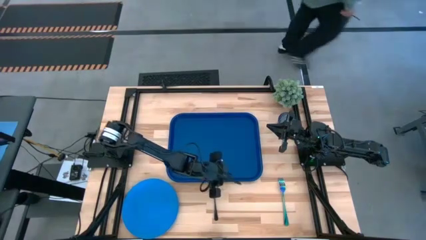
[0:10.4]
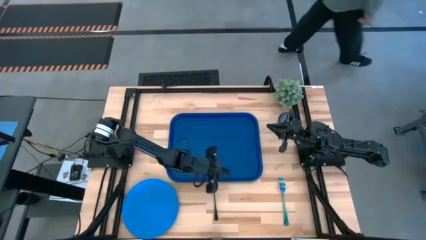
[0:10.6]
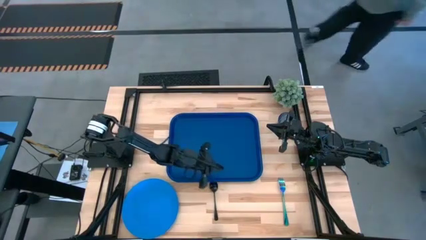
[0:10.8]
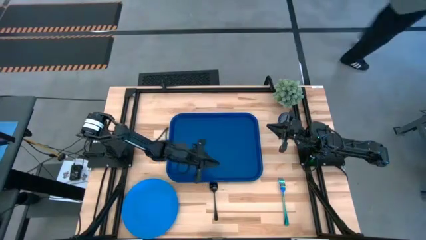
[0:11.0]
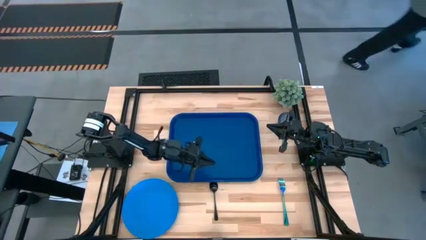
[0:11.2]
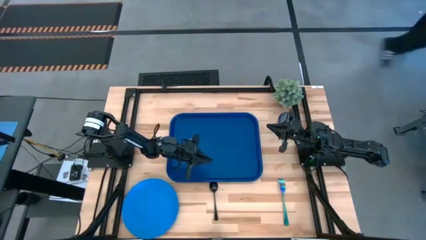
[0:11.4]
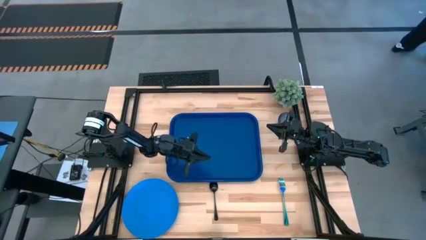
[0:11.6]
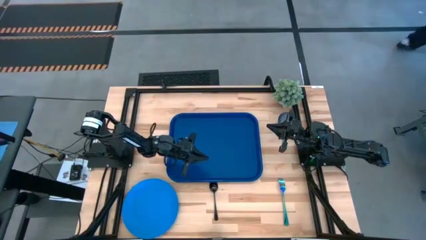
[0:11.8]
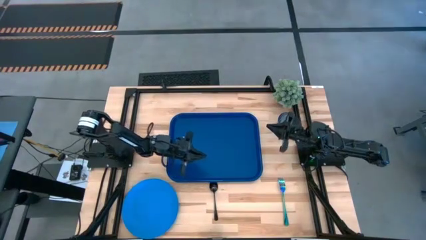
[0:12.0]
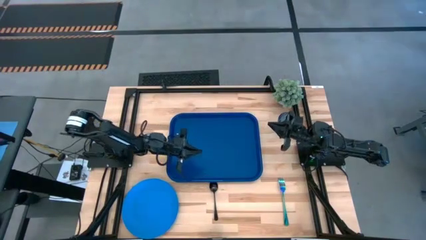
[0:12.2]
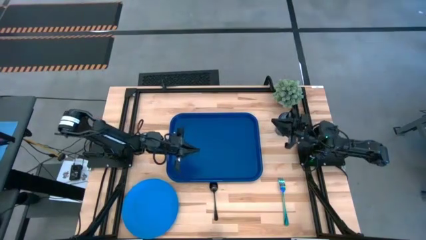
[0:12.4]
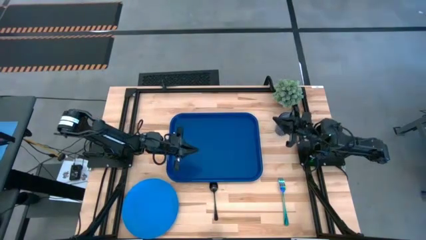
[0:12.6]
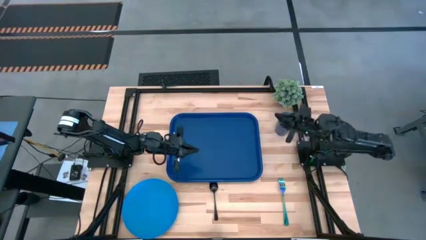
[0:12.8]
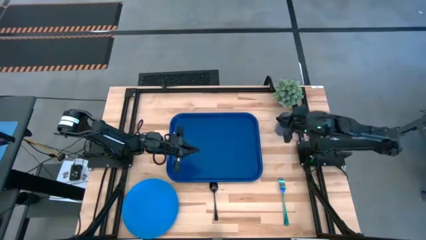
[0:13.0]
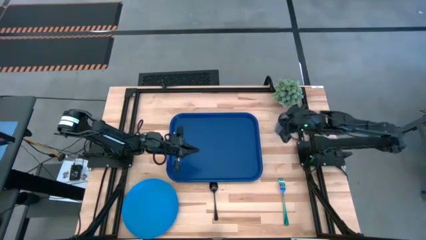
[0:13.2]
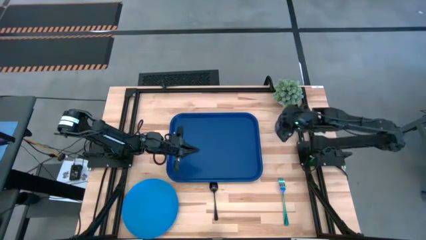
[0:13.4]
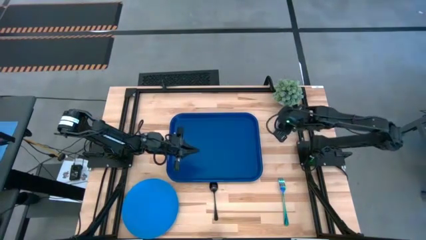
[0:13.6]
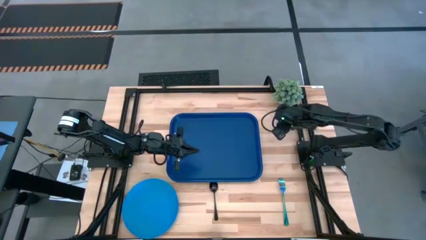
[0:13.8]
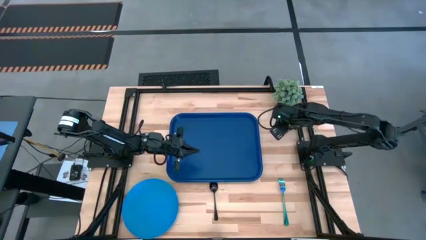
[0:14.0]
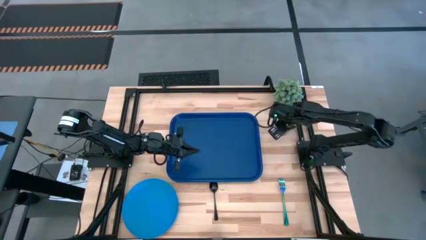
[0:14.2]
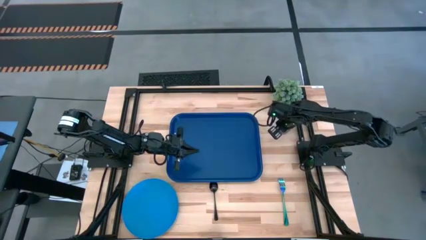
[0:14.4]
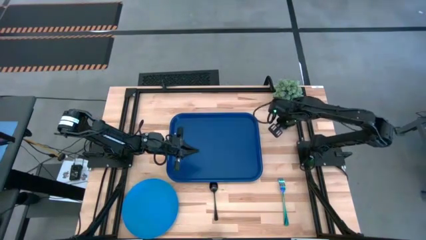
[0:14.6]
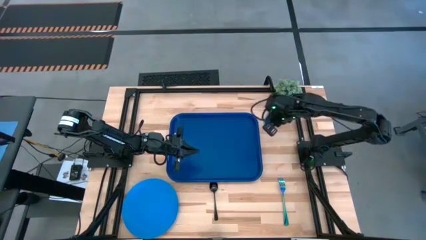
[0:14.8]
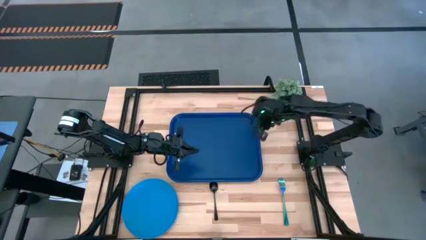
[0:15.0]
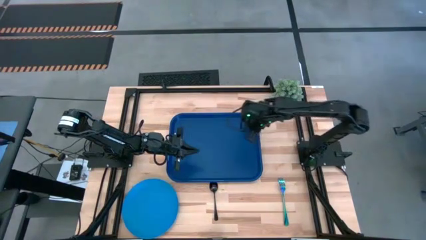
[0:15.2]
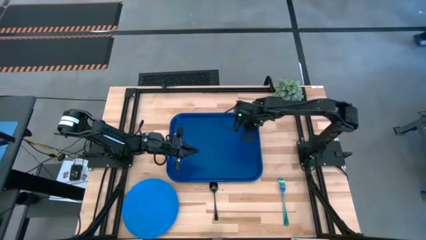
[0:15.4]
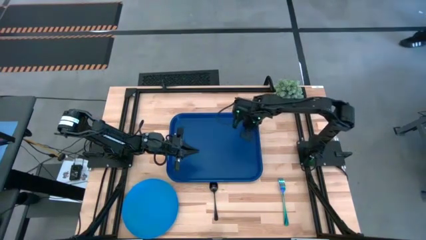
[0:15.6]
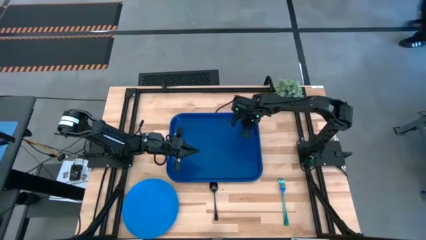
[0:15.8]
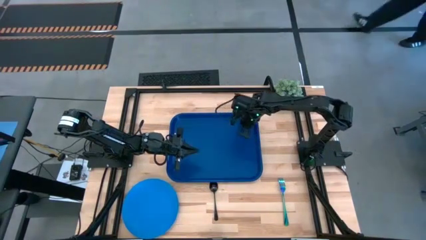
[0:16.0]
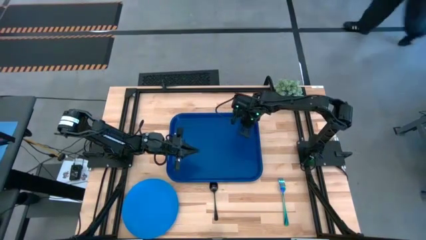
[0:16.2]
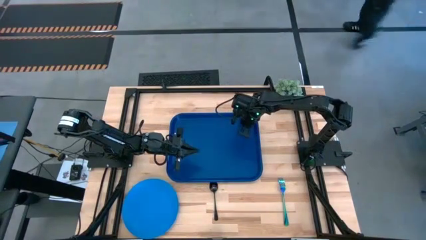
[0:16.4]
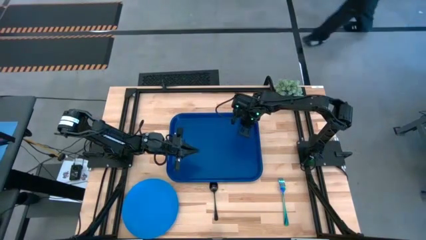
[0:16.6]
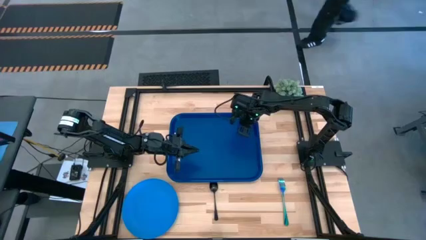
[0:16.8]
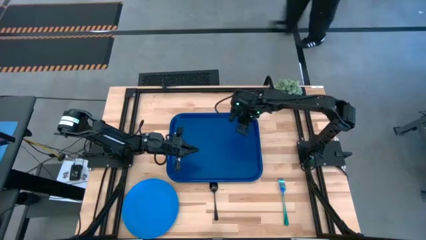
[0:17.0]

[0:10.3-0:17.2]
Task: Pick and place plate/cup/fork/spoon on tray
Put the blue glass cup on the top right side of the blue tray

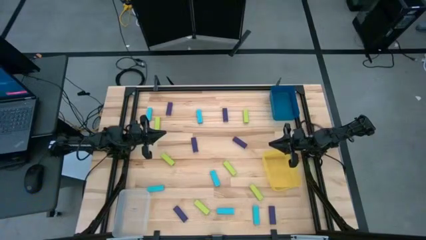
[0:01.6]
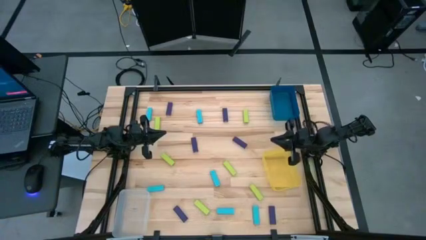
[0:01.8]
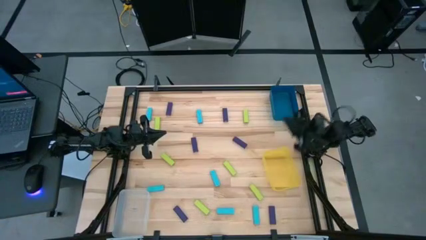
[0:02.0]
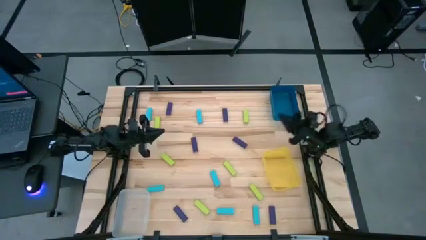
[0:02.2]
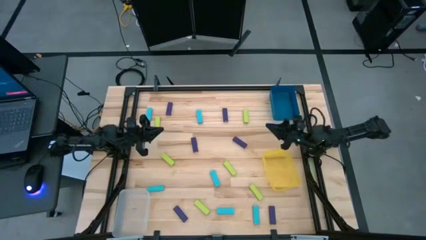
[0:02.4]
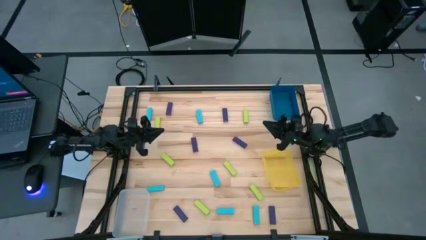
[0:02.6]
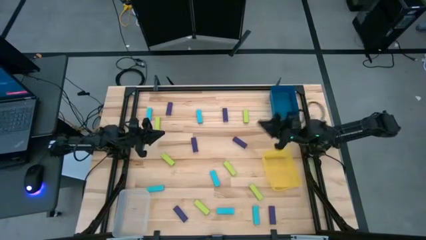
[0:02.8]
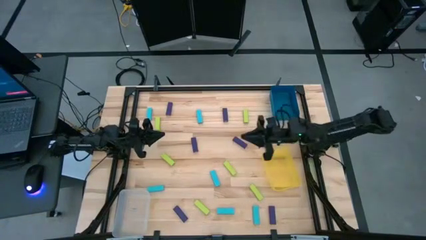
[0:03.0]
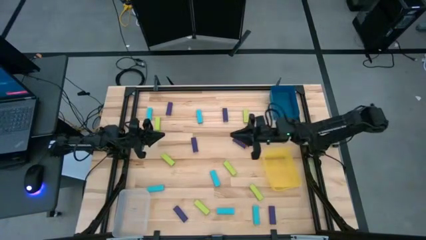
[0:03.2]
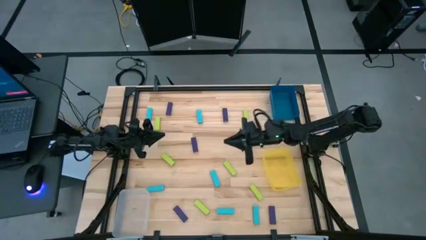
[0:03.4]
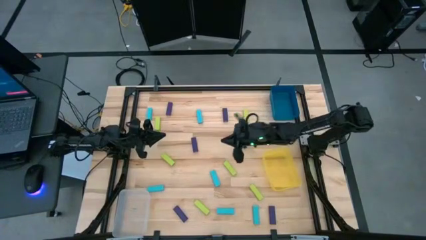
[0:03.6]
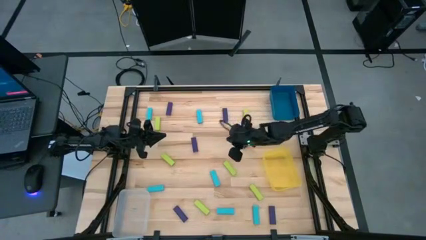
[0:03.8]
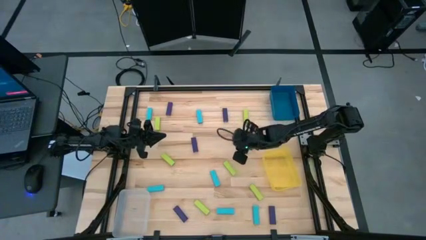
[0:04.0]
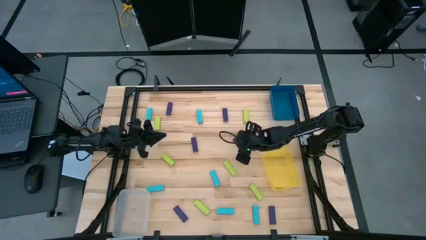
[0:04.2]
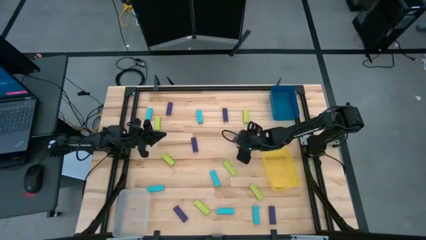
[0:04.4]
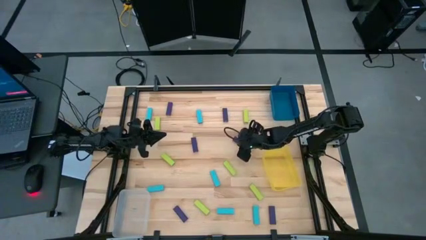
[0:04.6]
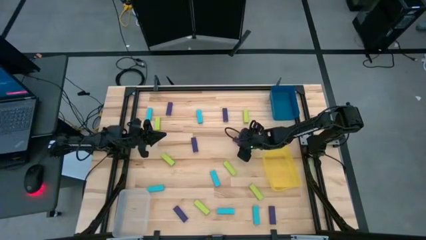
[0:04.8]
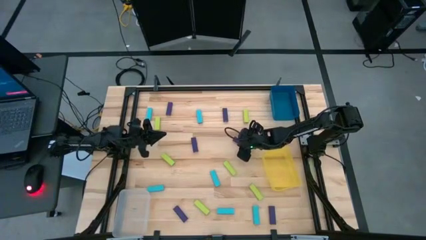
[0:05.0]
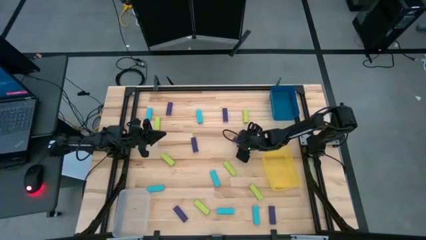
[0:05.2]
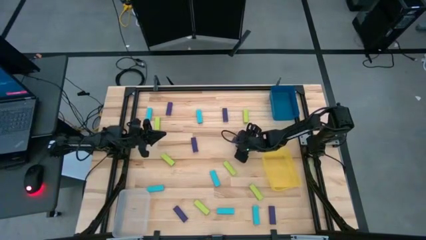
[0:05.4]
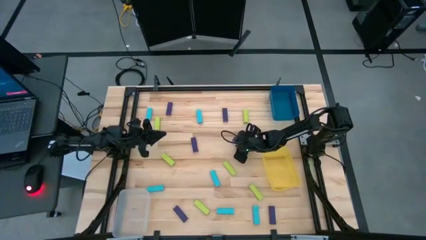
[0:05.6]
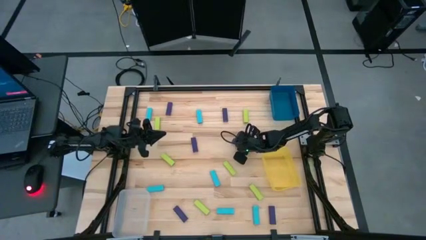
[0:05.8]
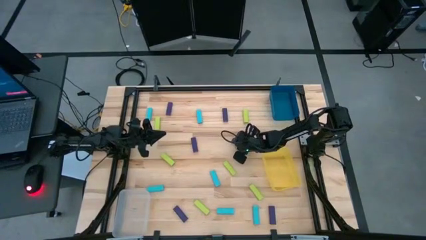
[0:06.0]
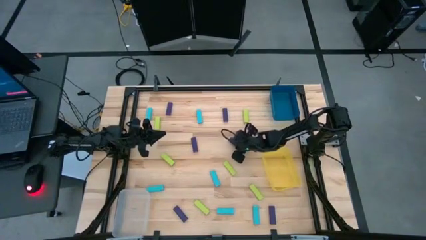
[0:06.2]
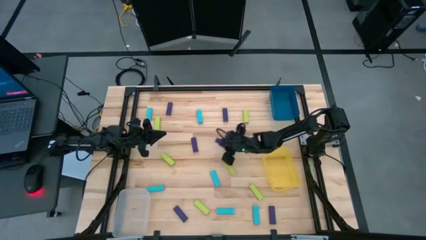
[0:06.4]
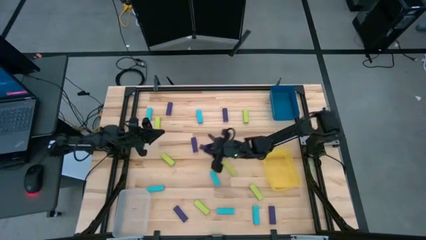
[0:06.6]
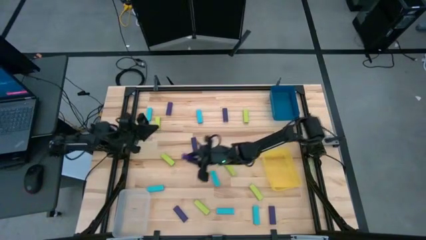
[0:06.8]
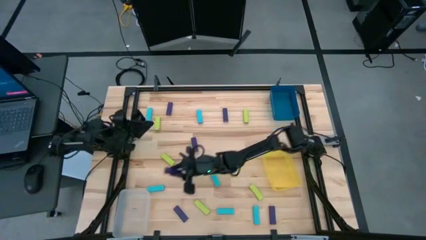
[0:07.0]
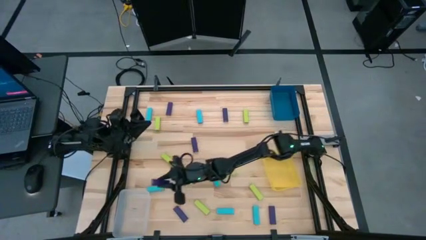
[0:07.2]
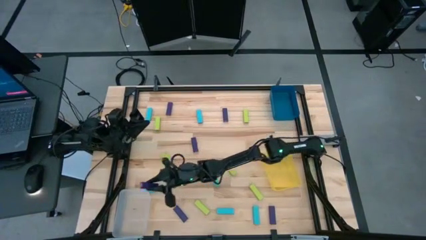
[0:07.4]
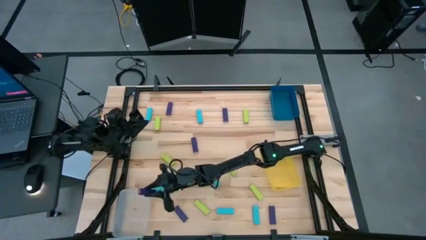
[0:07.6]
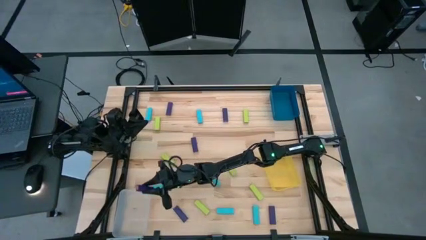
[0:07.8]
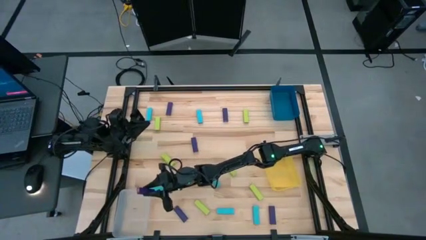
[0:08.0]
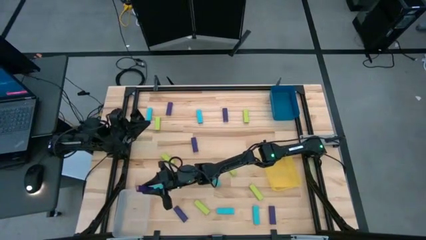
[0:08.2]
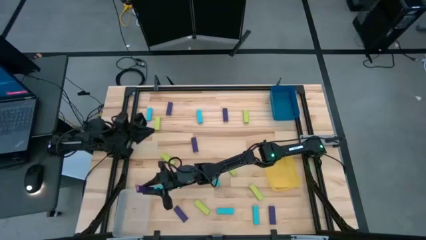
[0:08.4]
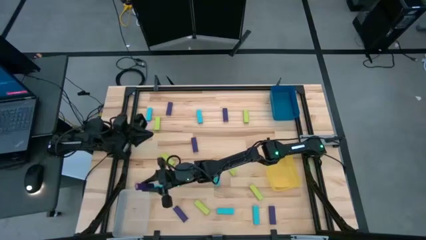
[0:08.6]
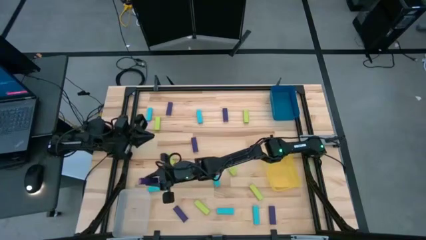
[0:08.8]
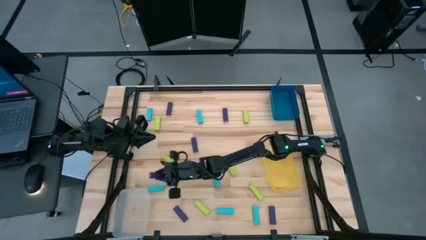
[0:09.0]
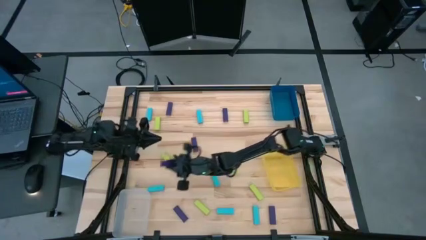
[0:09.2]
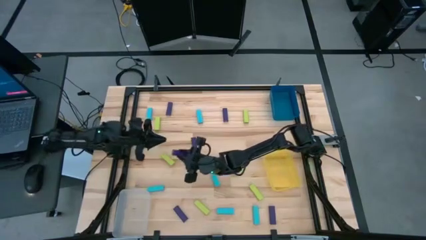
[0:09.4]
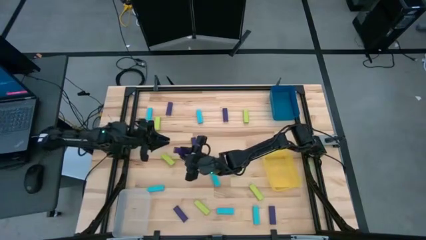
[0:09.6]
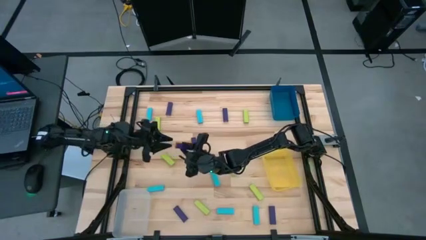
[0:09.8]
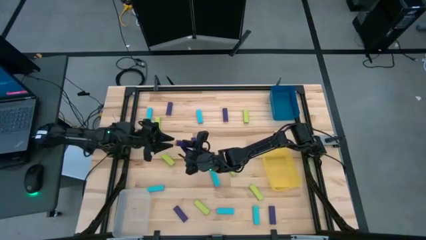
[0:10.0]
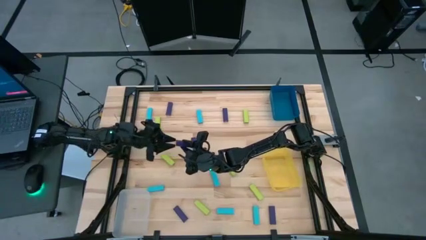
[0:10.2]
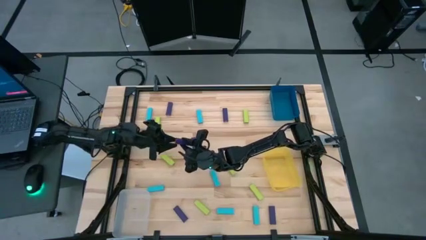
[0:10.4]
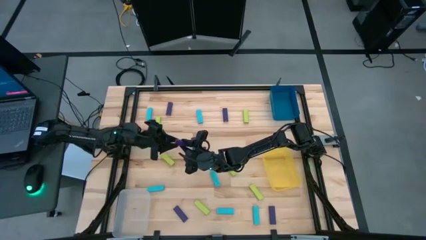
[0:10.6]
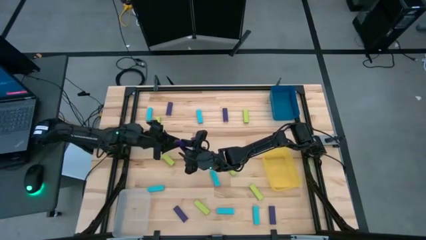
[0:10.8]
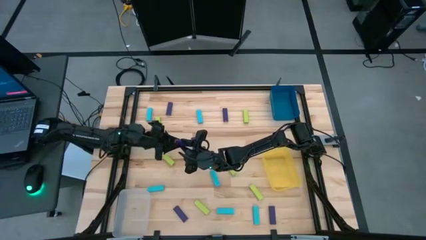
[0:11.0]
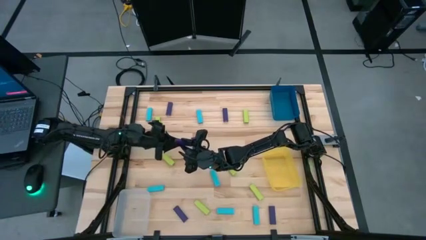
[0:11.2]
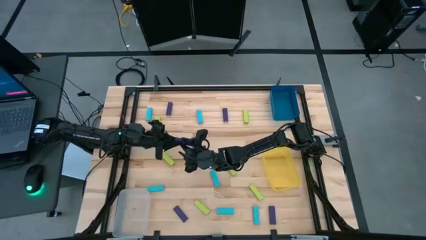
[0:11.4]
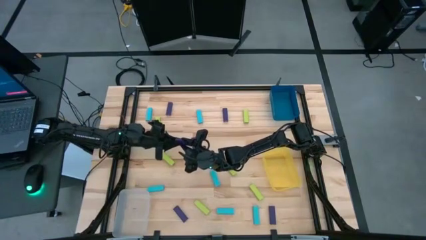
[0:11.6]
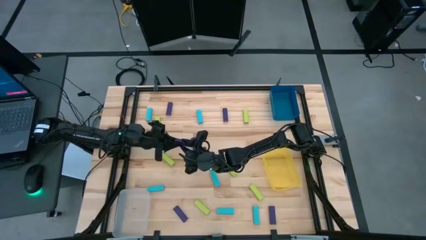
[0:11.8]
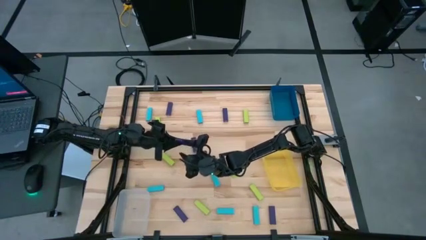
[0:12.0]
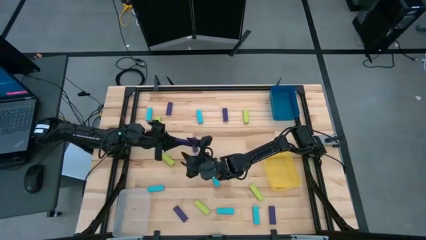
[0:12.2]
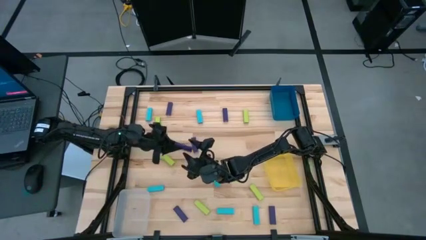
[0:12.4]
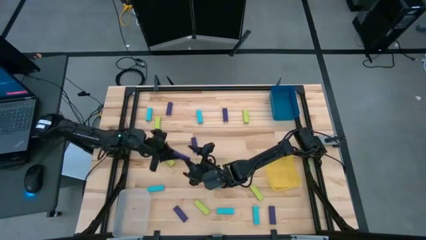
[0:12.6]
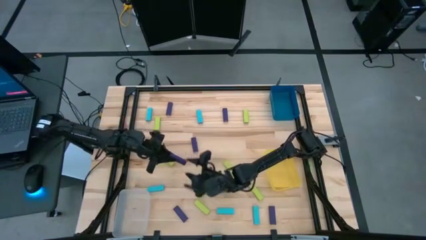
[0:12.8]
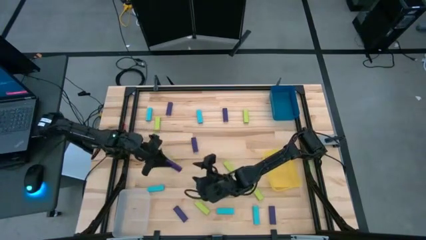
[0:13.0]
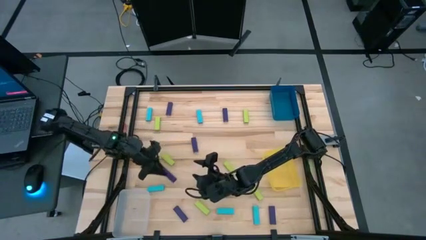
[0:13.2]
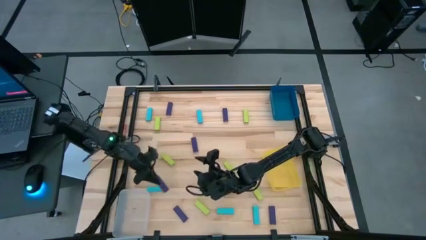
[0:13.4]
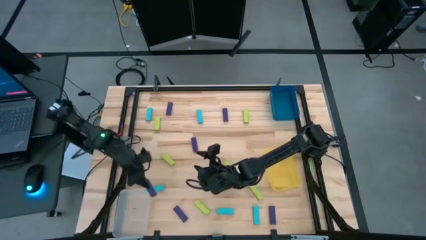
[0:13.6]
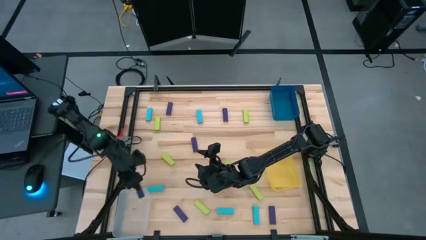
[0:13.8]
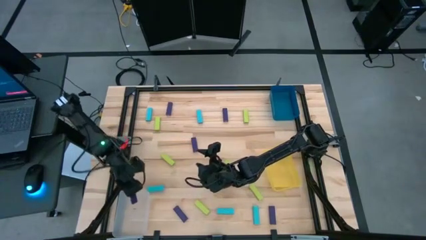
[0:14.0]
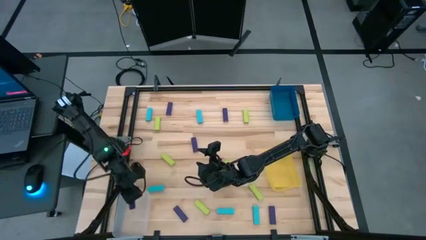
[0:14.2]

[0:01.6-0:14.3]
Task: Sort blocks
Put the violet block into the transparent bin
